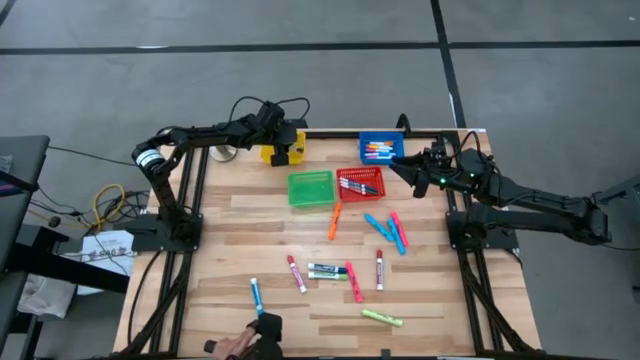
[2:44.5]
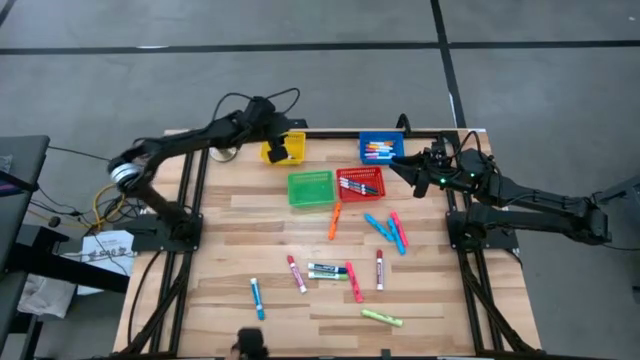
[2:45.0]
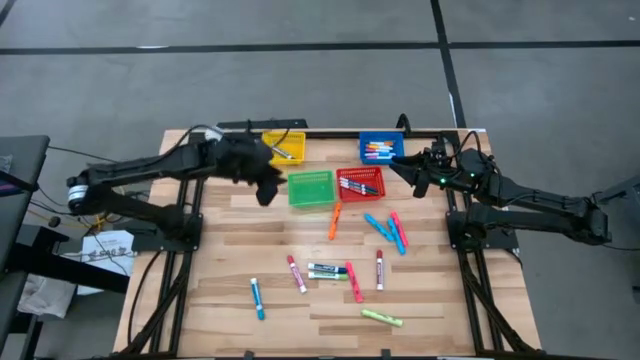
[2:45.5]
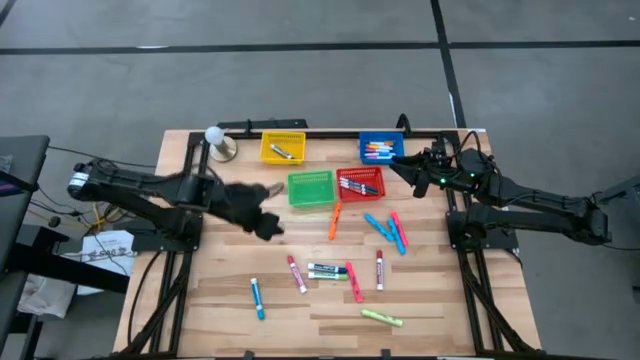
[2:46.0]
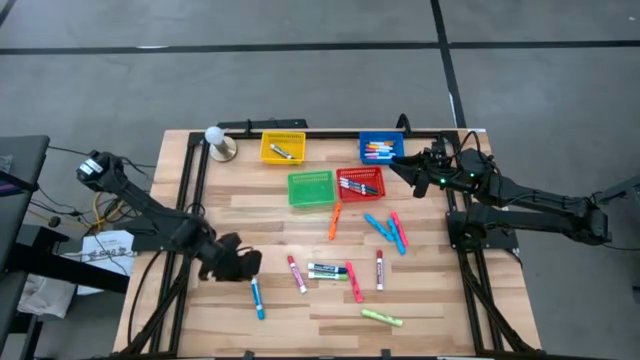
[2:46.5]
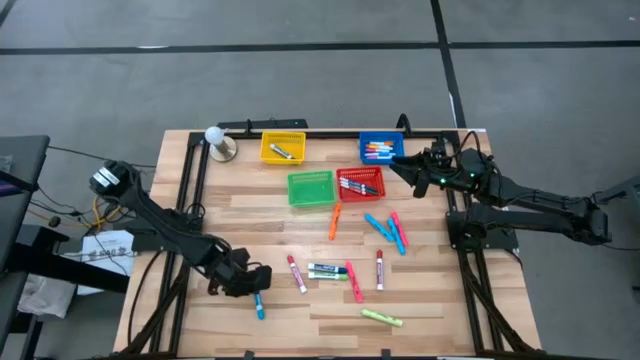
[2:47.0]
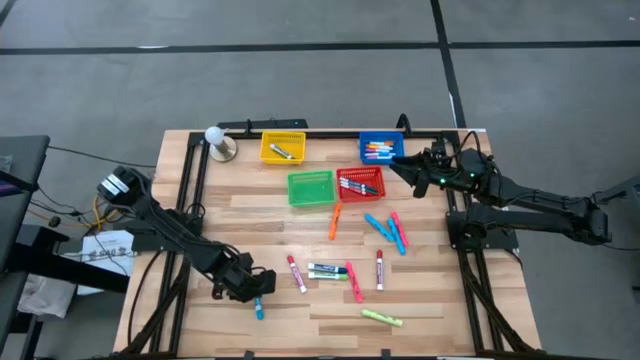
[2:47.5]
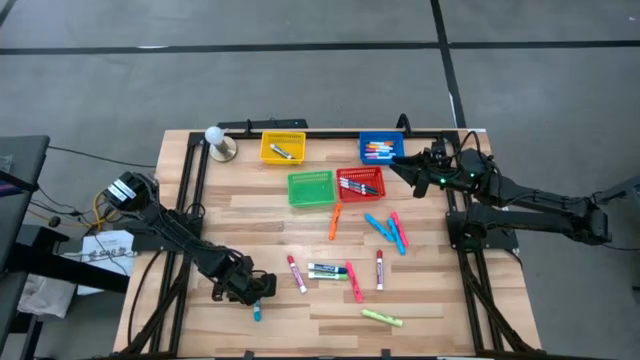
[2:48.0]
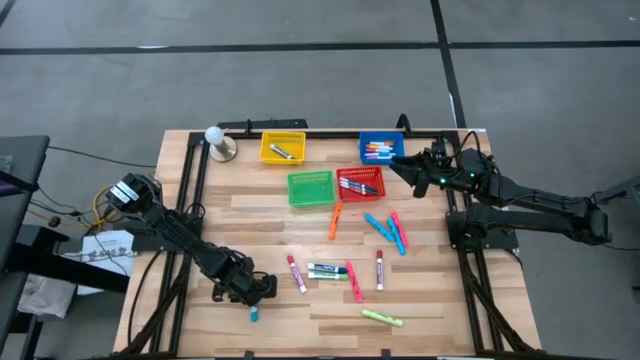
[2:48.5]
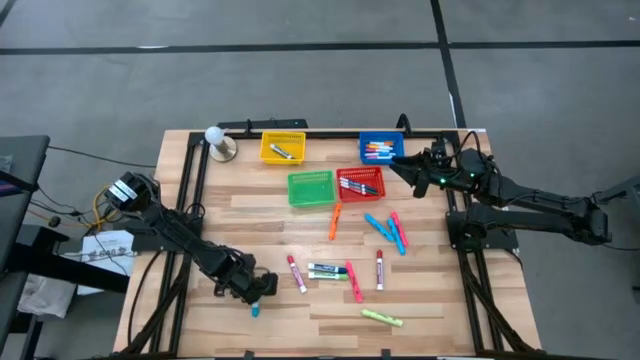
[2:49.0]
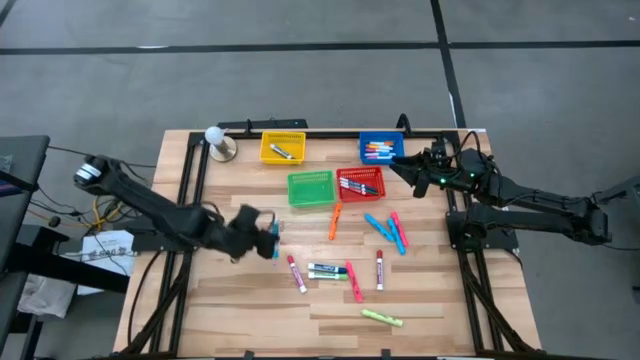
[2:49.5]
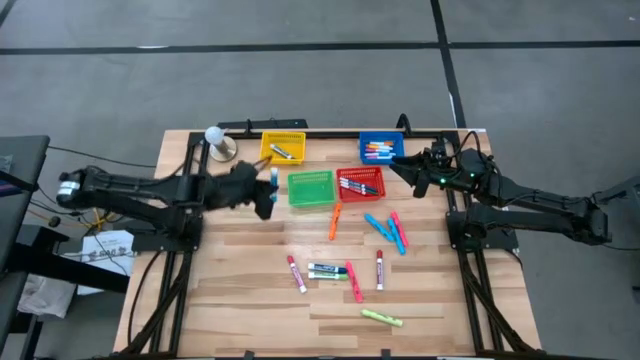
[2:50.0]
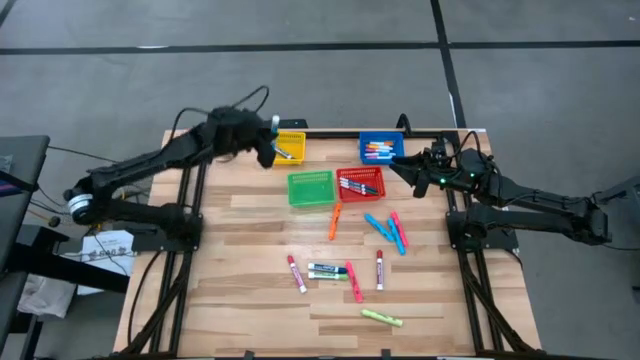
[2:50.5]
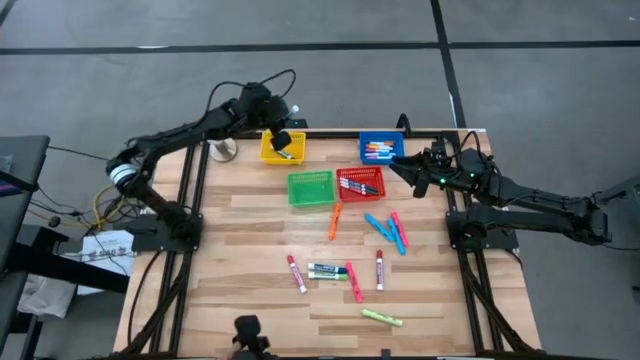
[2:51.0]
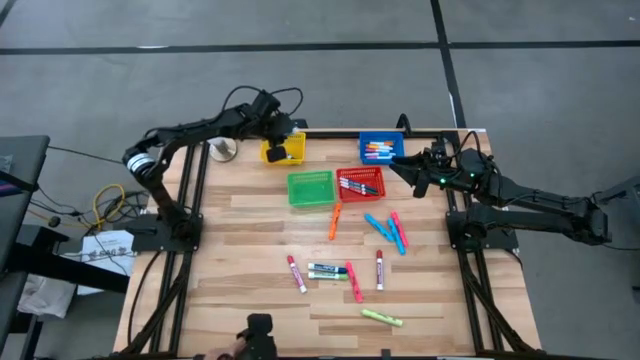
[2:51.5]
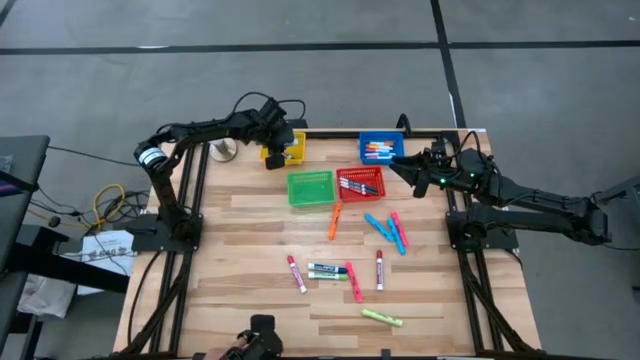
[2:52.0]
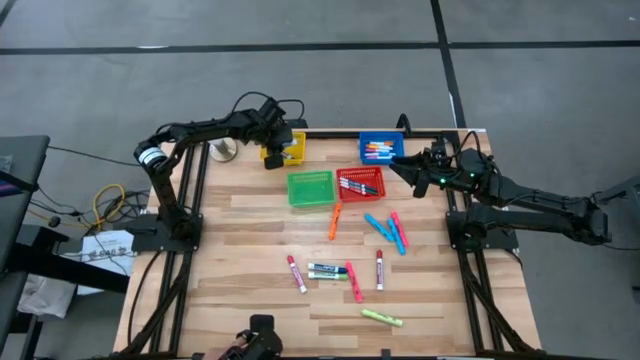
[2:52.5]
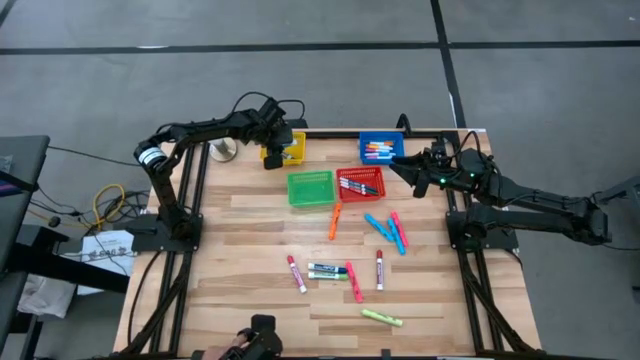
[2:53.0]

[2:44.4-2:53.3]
Task: Pick & Place Markers
Put the light blue marker pen into the yellow bin

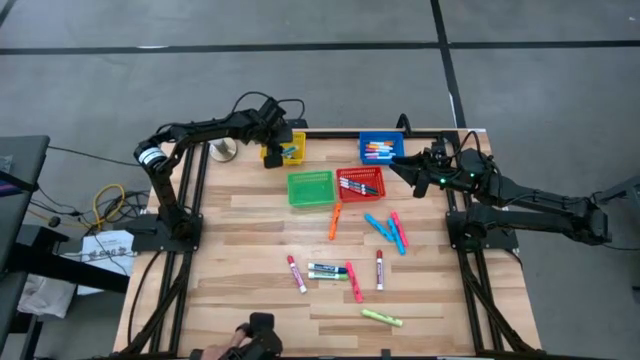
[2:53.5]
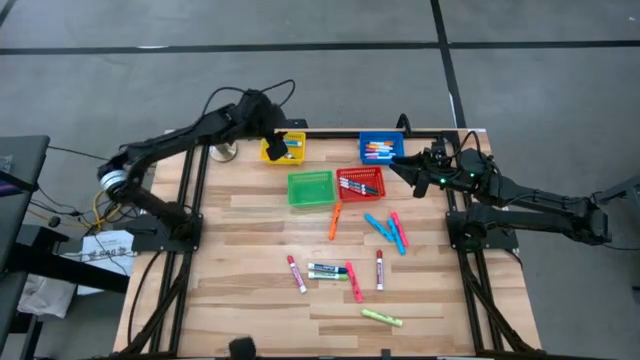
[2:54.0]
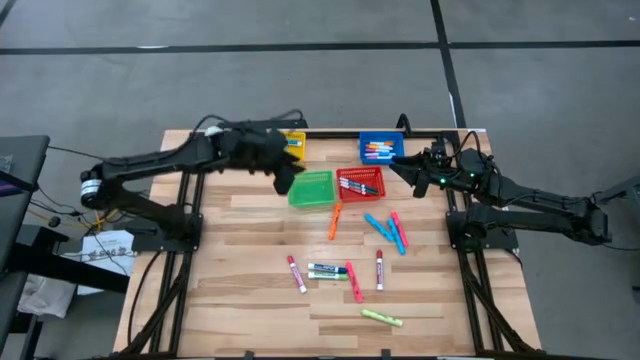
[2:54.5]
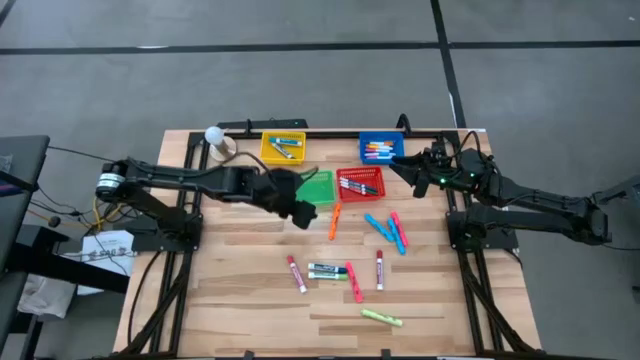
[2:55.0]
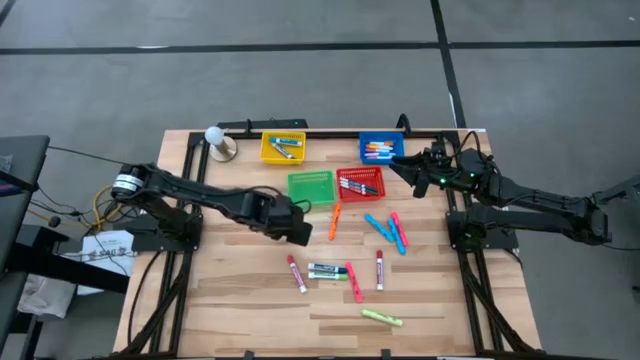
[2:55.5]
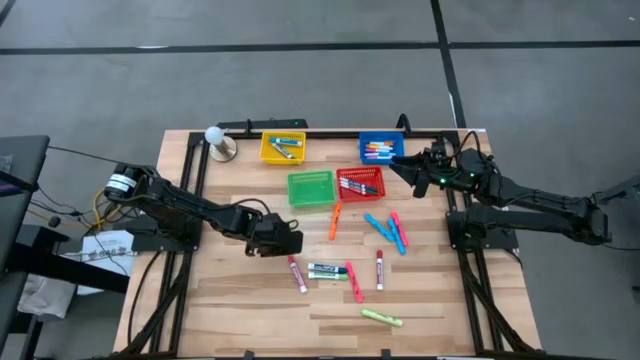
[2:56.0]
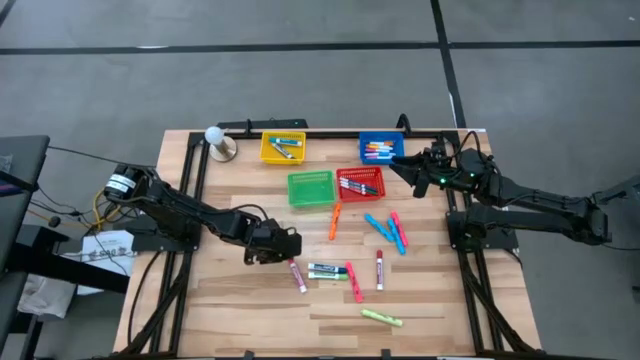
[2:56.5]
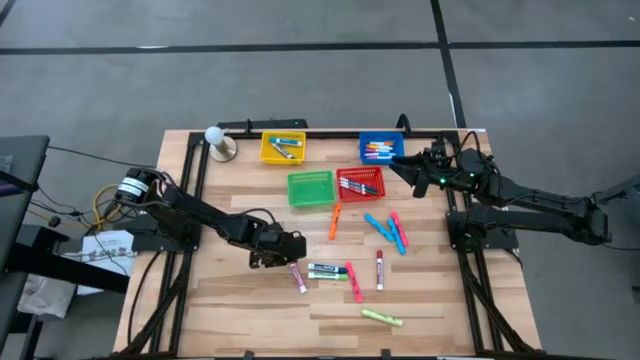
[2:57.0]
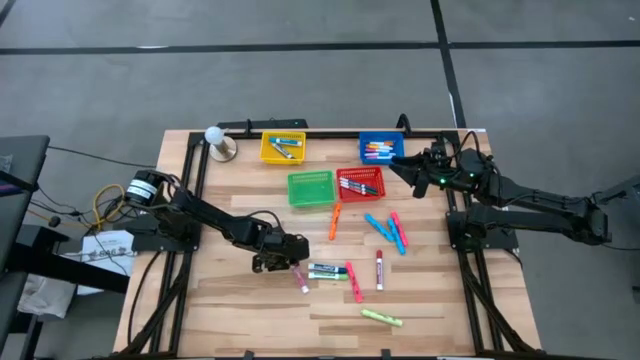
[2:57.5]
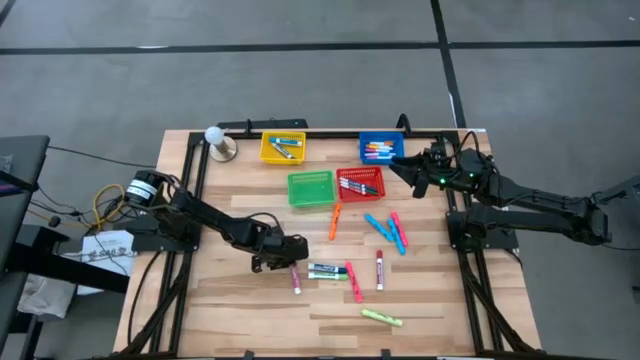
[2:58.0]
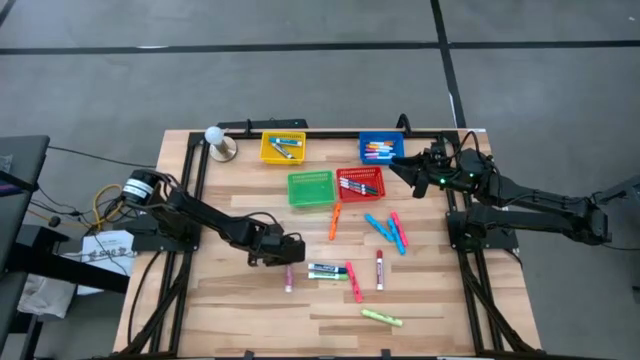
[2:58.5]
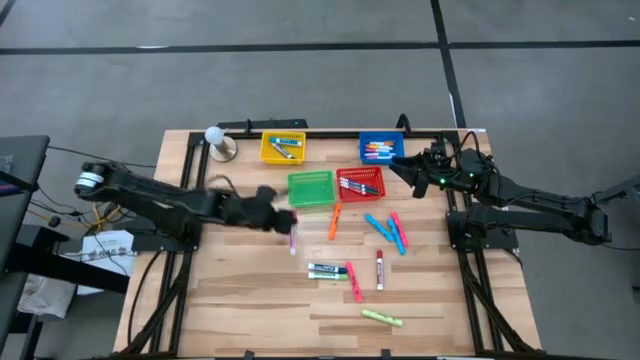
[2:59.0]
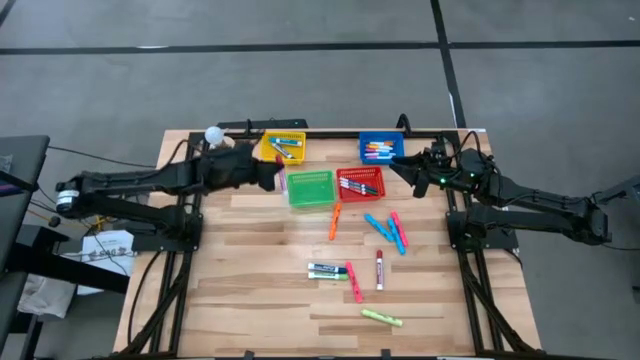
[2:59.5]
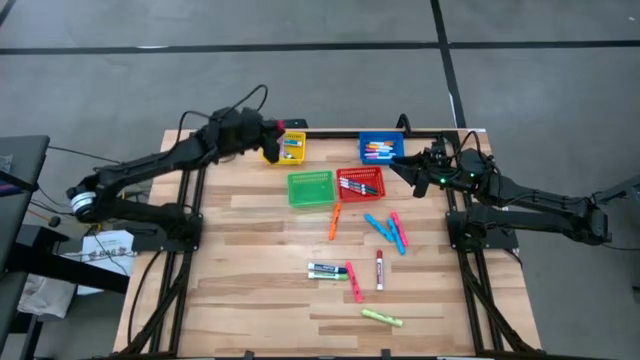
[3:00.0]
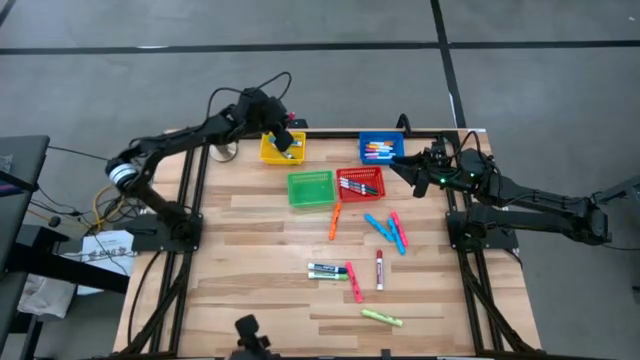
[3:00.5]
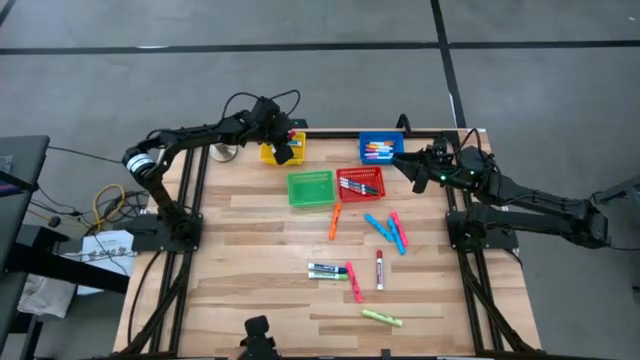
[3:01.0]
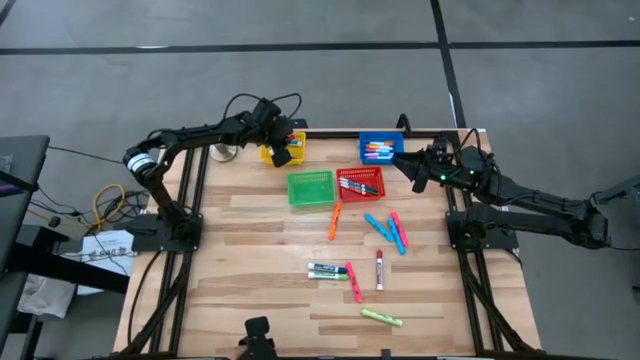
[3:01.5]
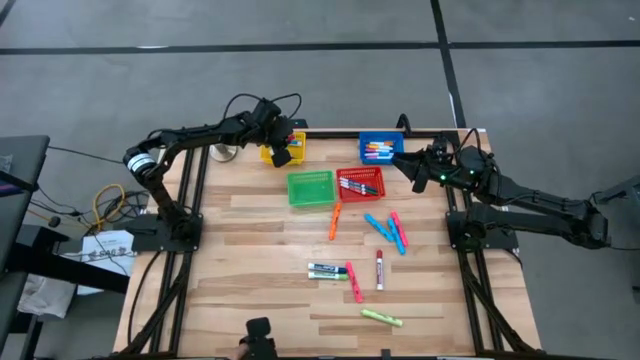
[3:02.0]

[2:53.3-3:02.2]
Put the pink marker pen into the yellow bin

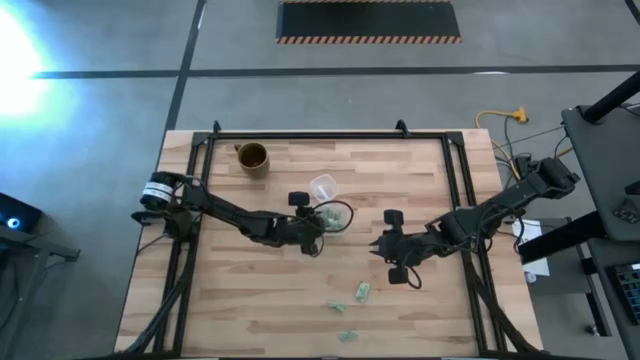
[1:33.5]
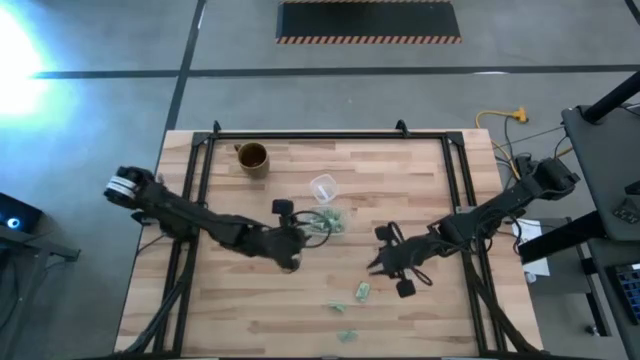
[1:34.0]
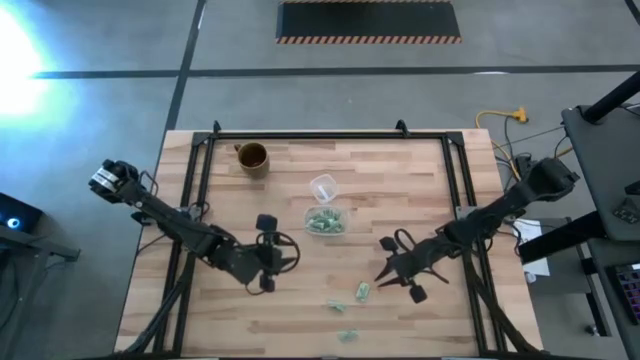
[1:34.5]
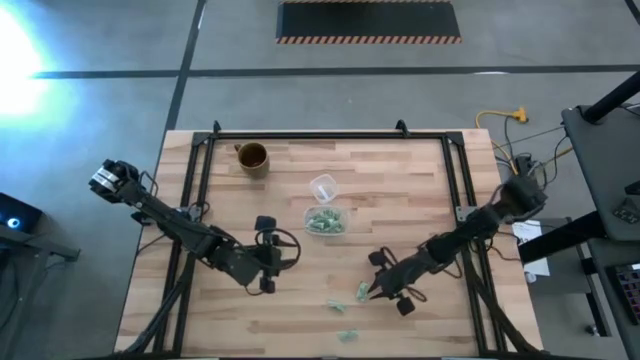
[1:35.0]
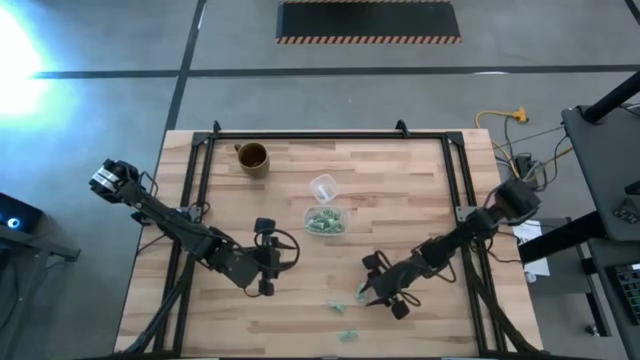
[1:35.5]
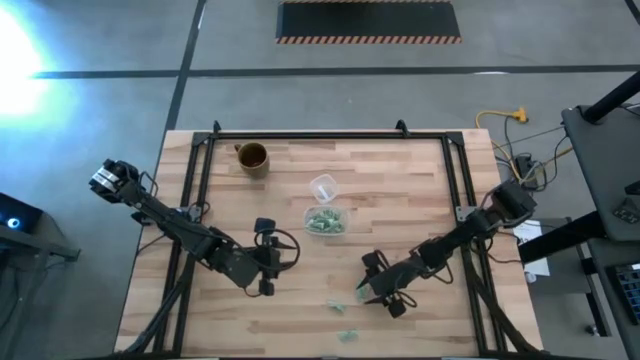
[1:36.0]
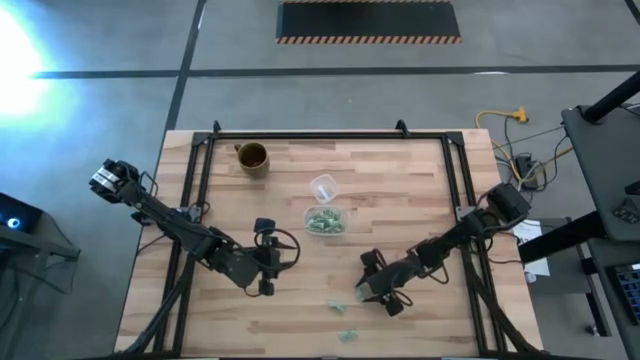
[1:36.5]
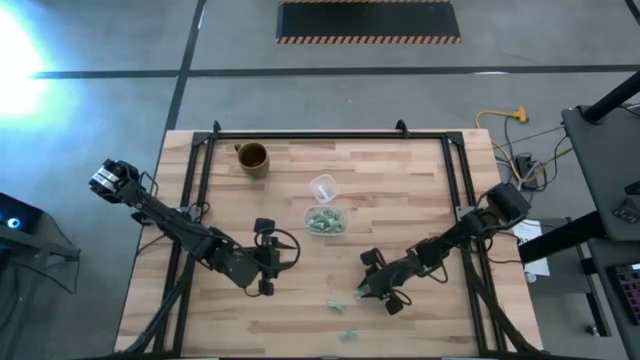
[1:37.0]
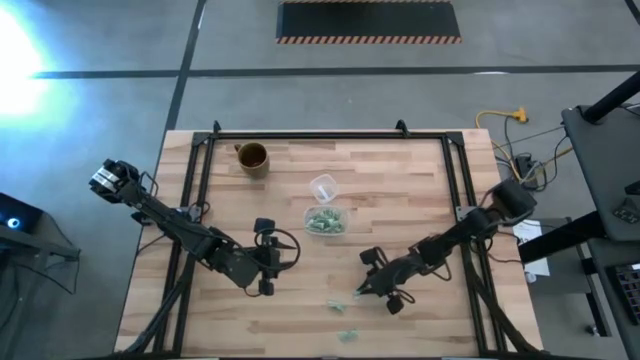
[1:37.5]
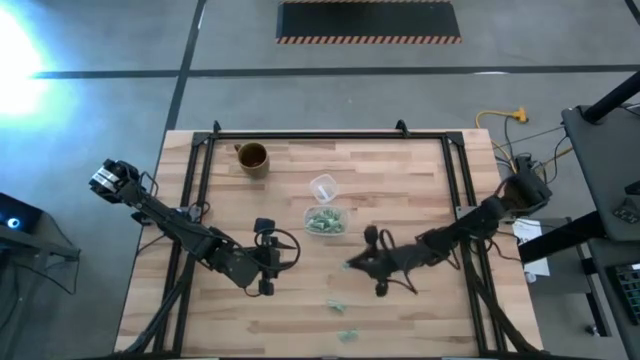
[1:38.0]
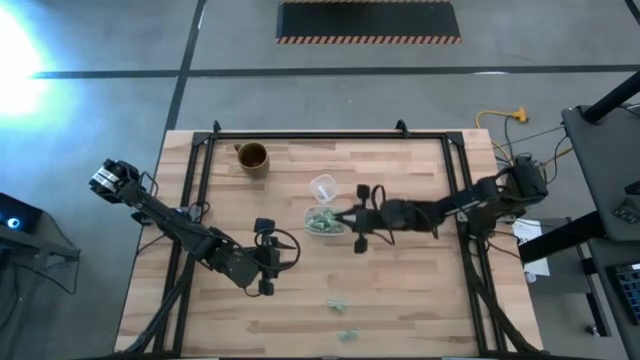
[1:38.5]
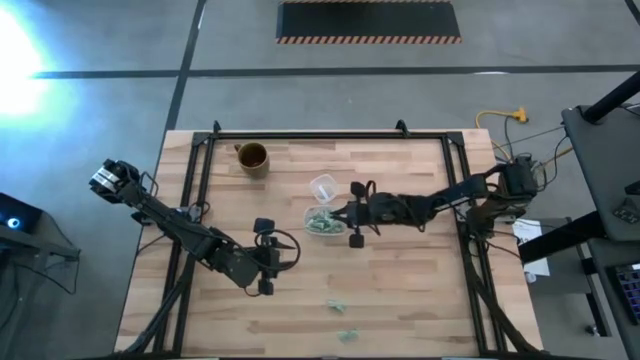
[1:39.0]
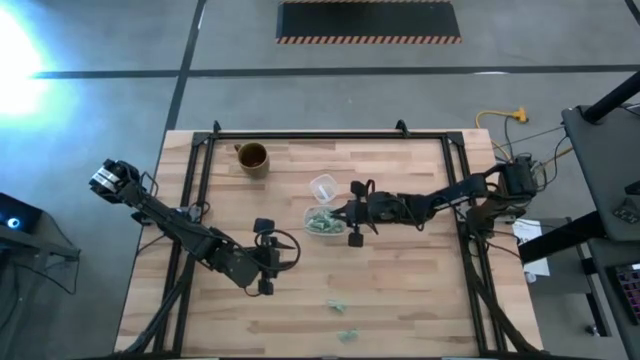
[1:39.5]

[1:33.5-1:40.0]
Task: Pick and place Stevia / Truvia into bins
Put the stevia packet into the bottom transparent container
